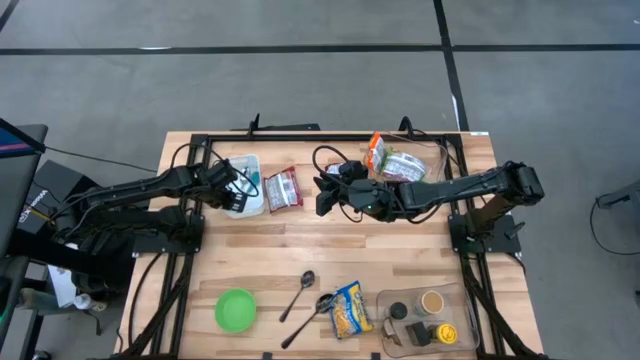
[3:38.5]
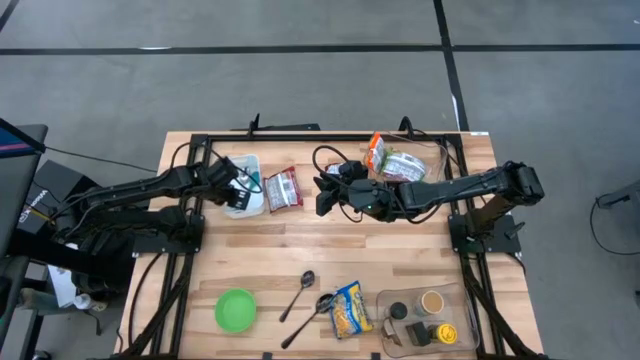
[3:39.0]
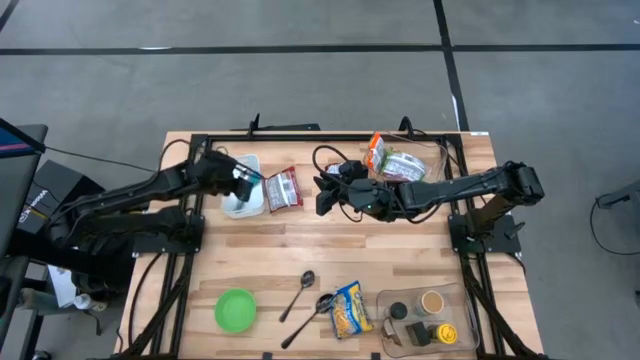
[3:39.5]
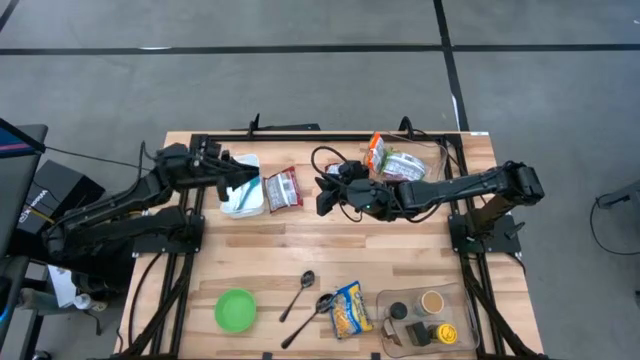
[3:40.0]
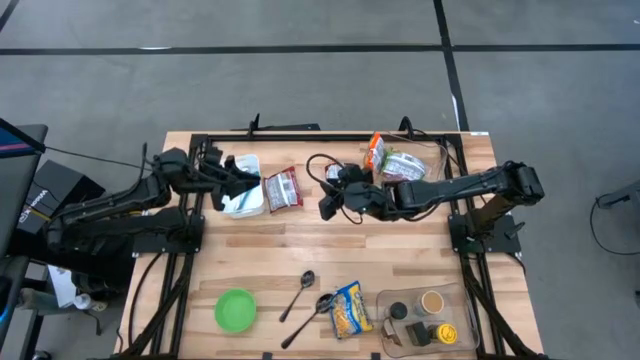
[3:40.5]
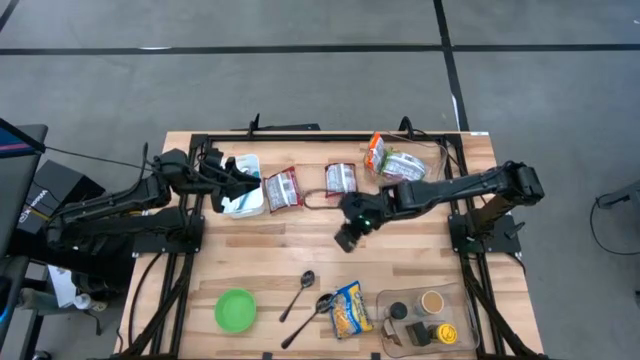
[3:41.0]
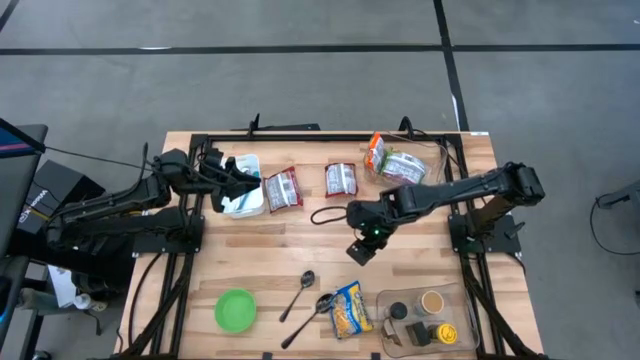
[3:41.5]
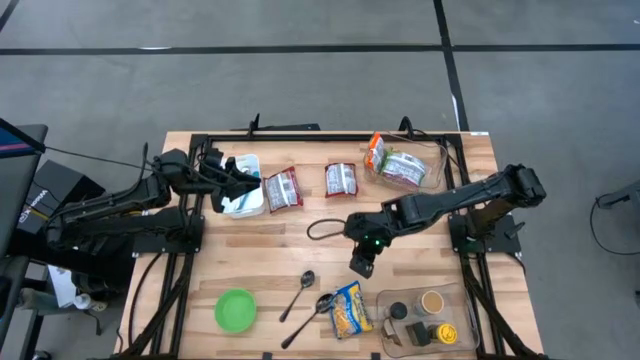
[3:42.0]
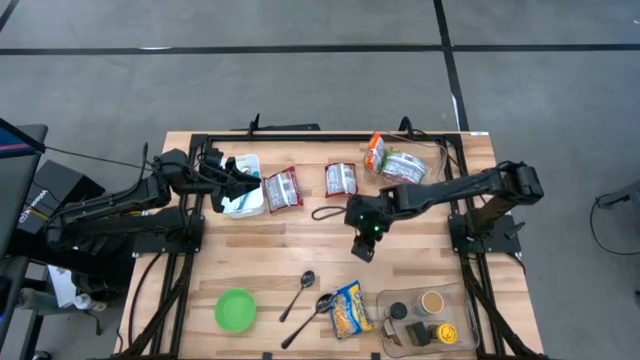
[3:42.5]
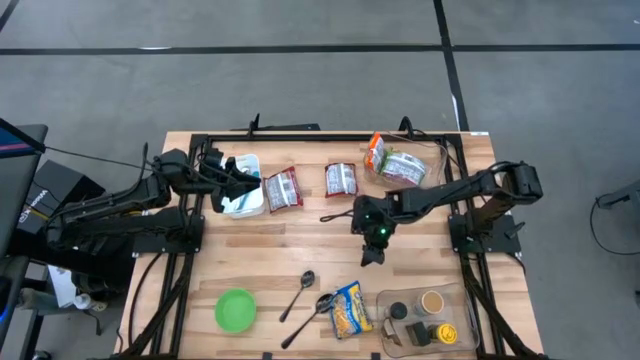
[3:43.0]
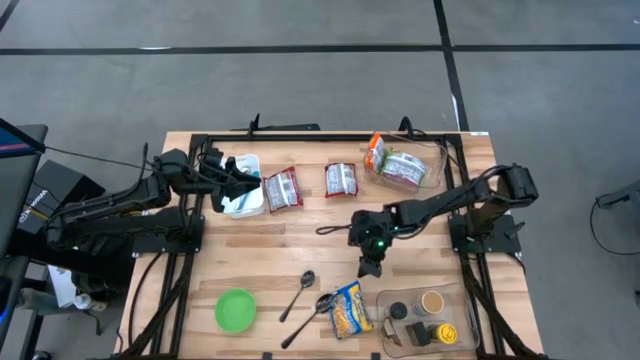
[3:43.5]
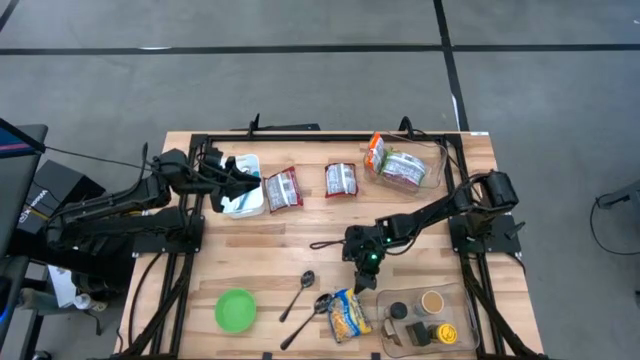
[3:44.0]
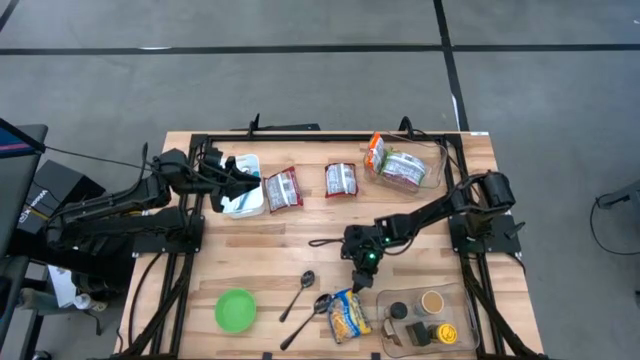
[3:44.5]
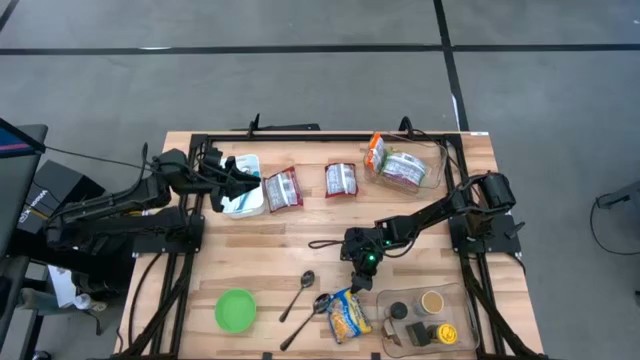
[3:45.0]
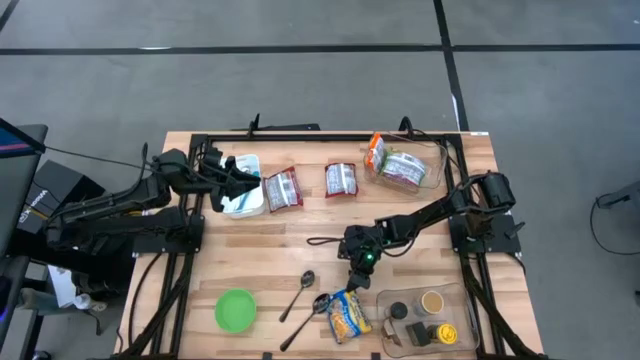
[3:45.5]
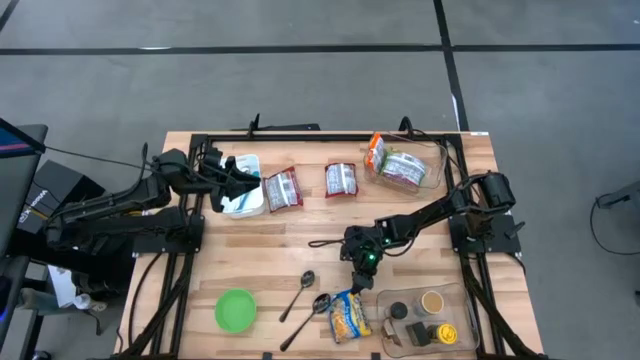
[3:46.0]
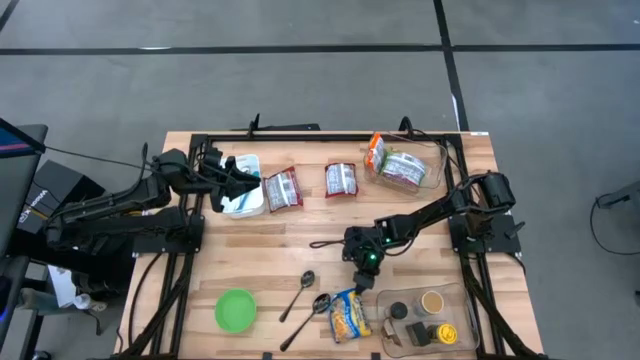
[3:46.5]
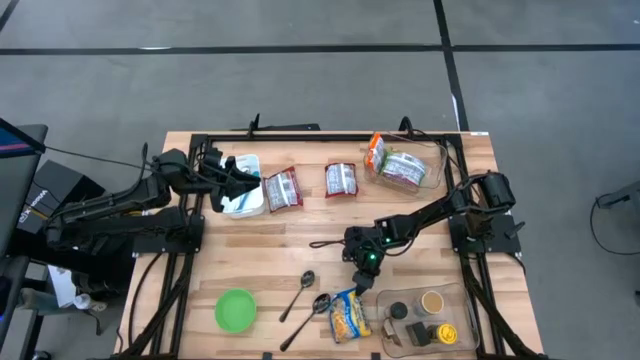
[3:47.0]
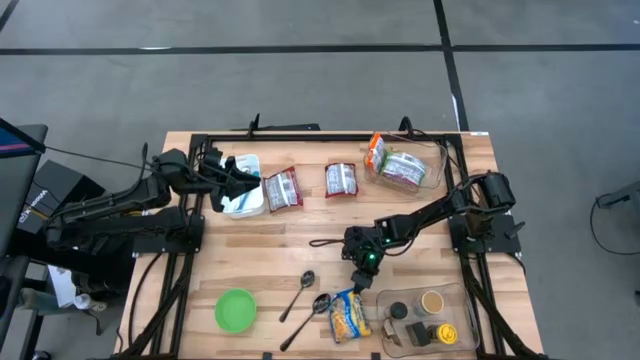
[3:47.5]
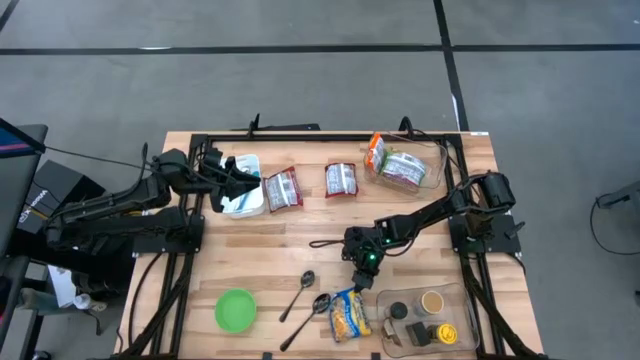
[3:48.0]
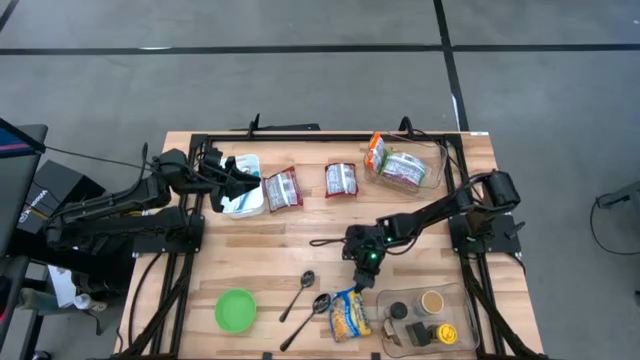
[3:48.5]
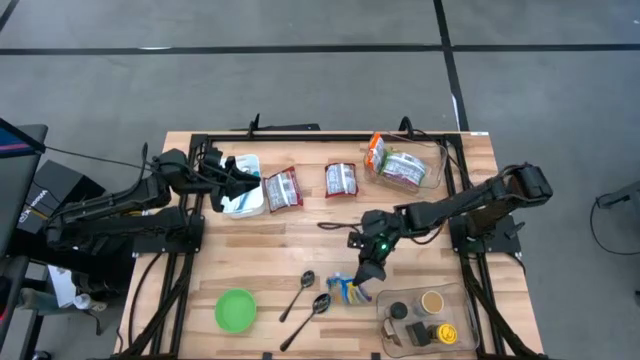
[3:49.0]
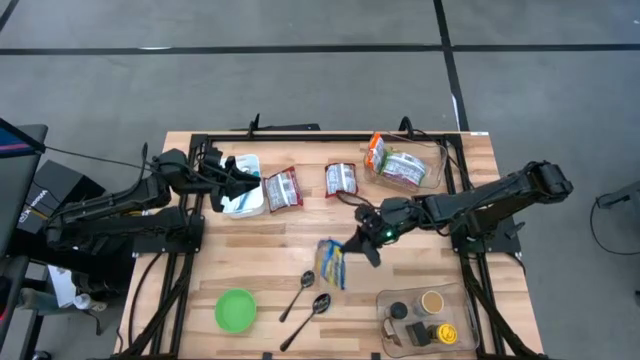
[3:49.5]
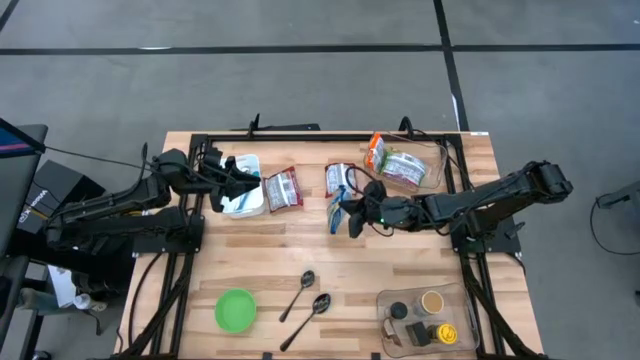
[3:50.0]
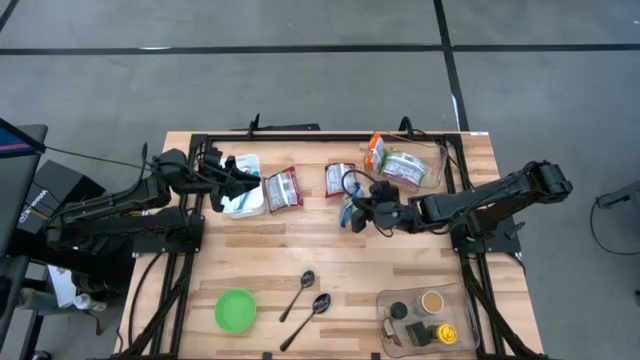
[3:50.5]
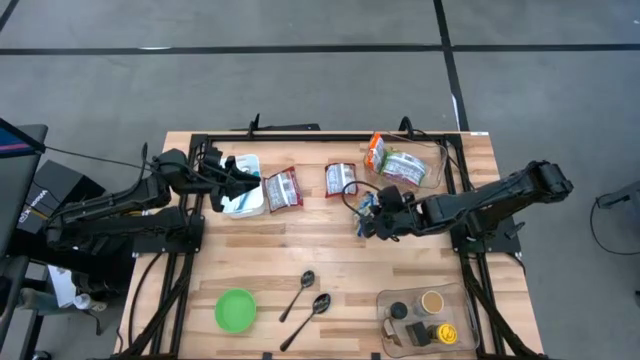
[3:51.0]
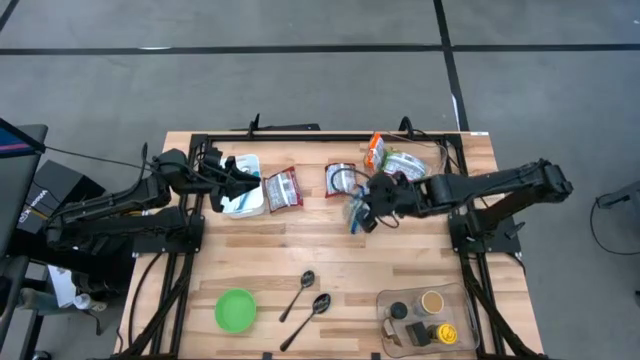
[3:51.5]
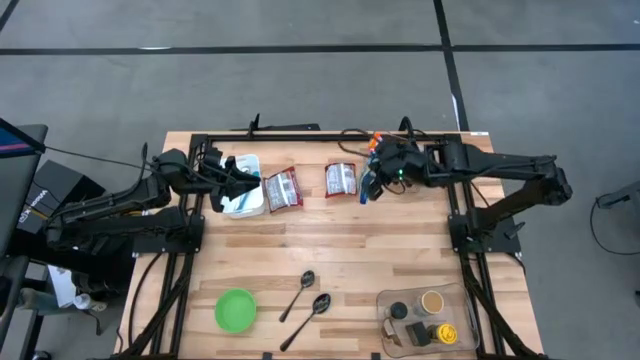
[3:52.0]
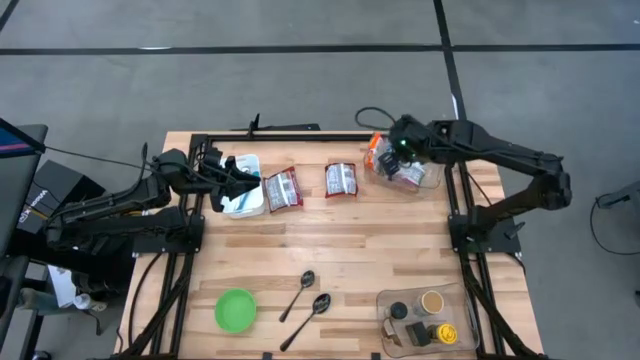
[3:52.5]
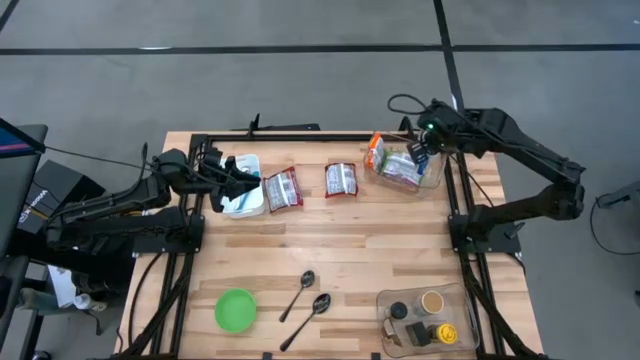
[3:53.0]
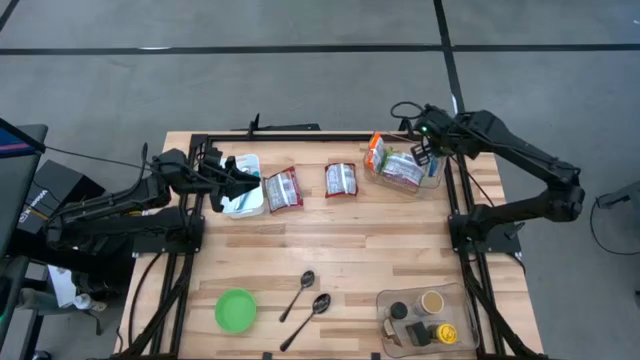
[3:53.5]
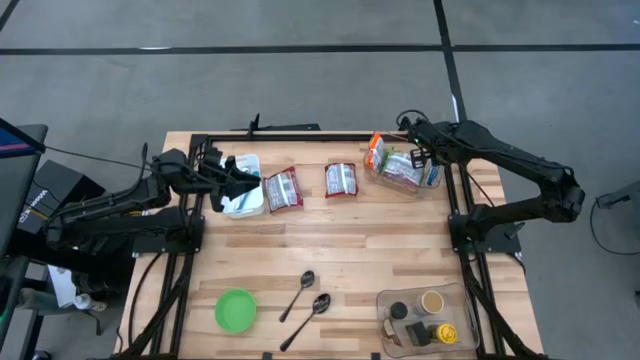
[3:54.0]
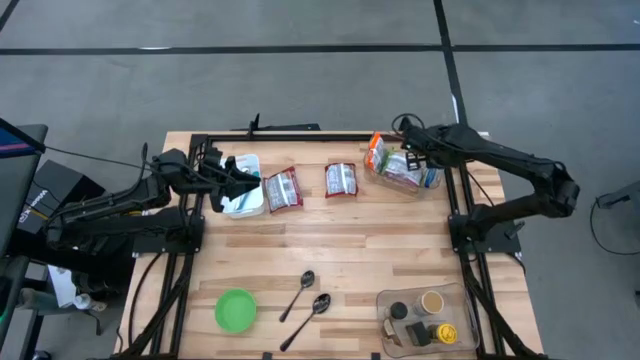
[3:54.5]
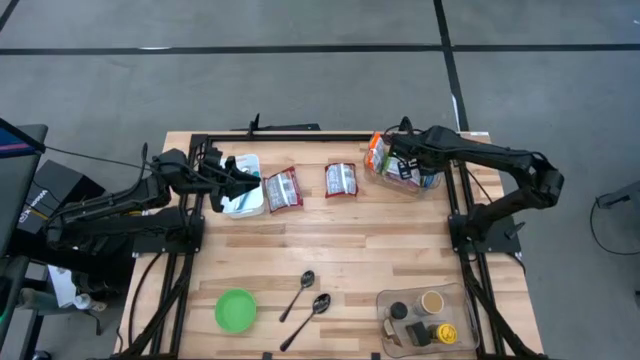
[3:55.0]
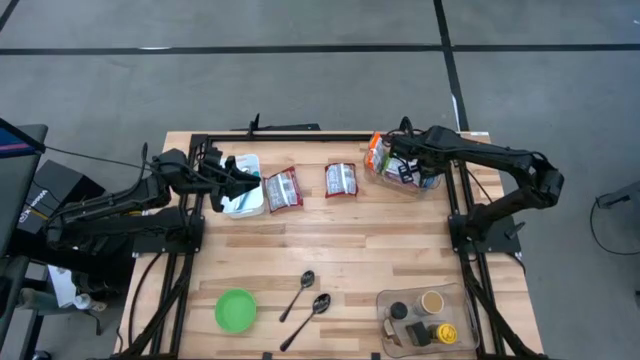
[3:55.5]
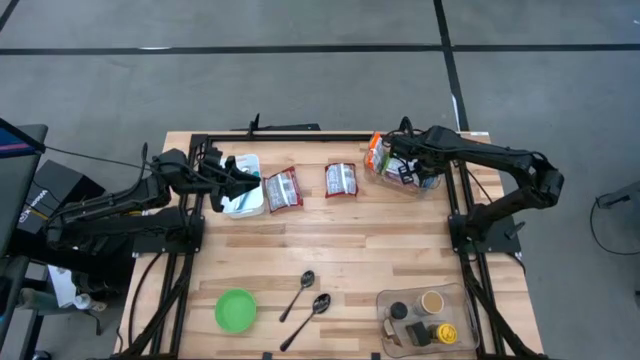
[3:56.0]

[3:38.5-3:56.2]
Task: Pick & Place Food Item
Put the blue noodle pack into the top transparent bin

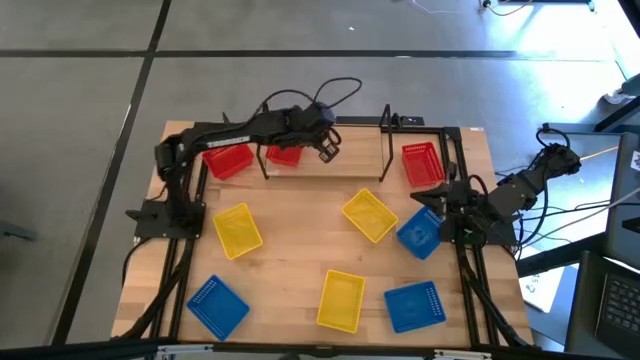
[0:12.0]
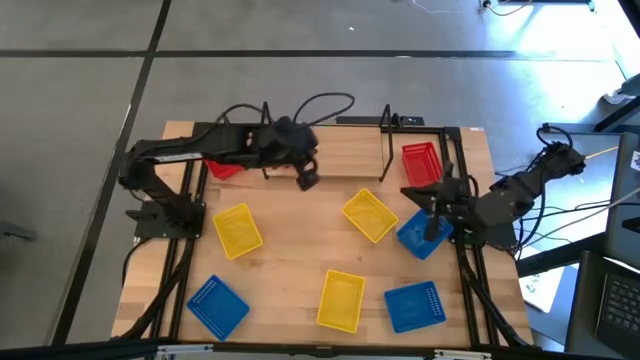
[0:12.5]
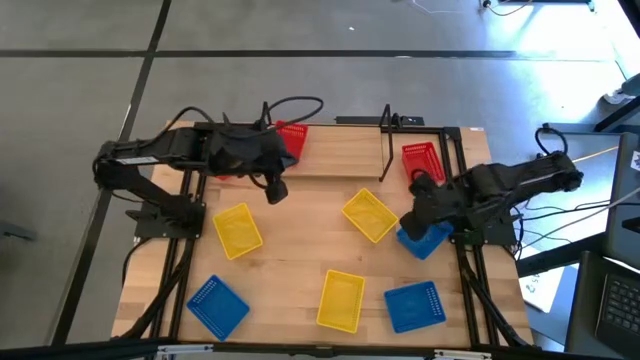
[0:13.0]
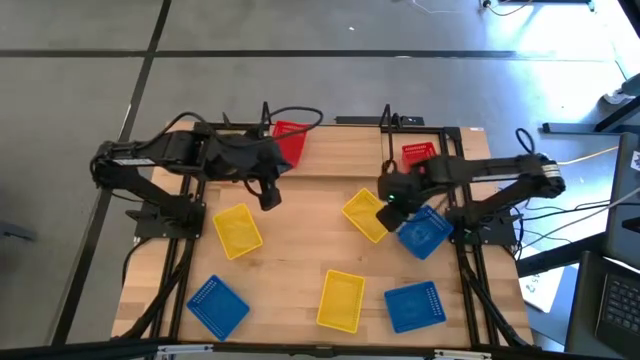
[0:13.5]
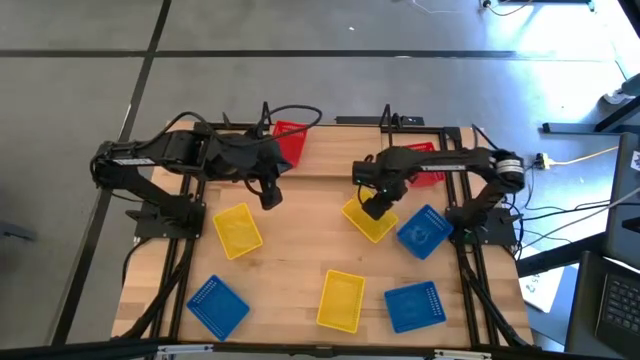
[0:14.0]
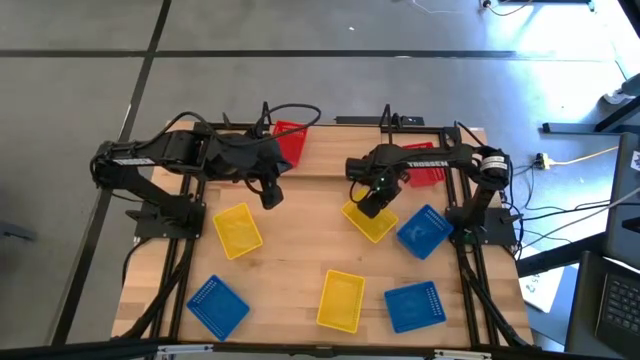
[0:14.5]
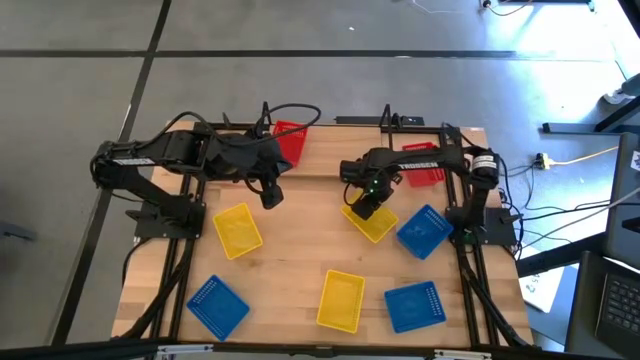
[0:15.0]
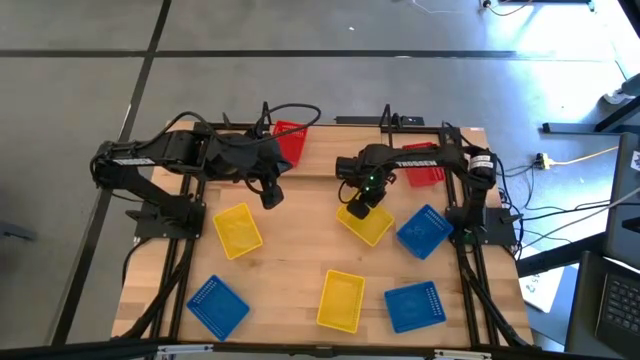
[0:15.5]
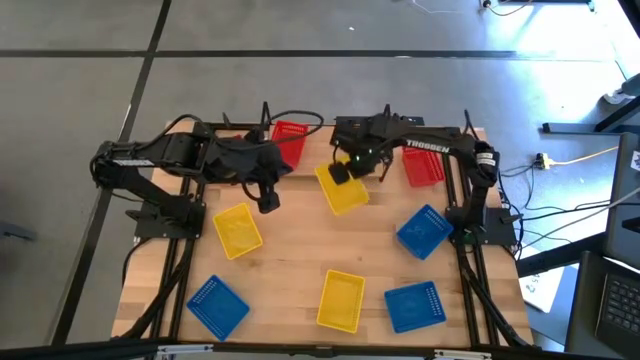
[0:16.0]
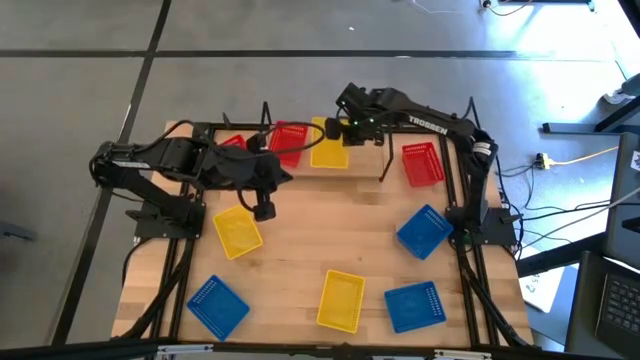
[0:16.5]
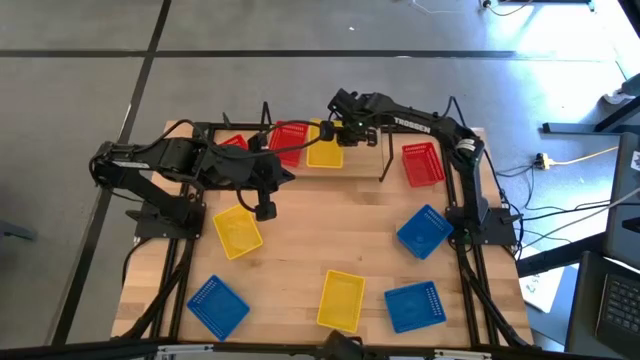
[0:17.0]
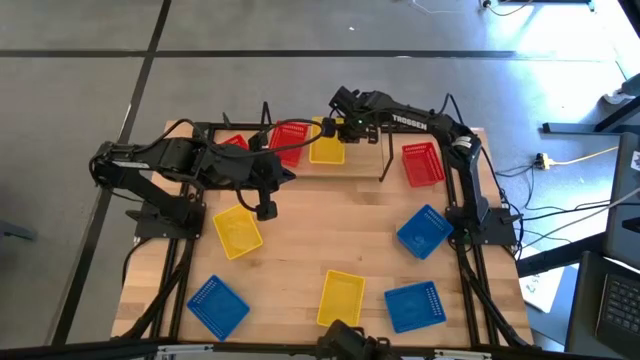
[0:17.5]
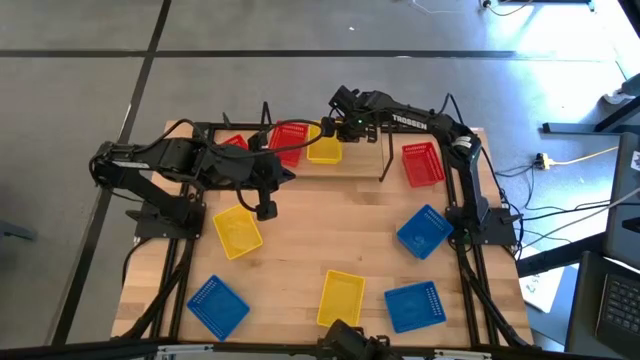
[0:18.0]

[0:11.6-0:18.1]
Task: Stack baskets on shelf by color
Put the top right yellow bin on the shelf
